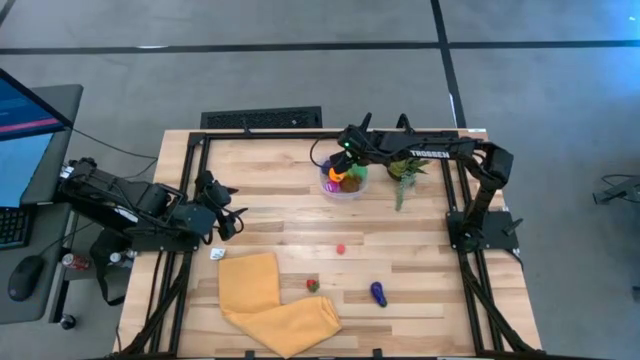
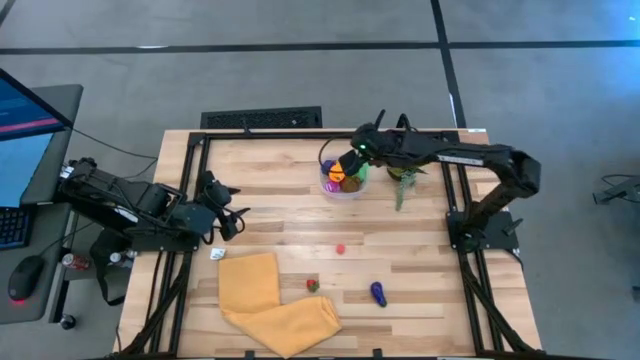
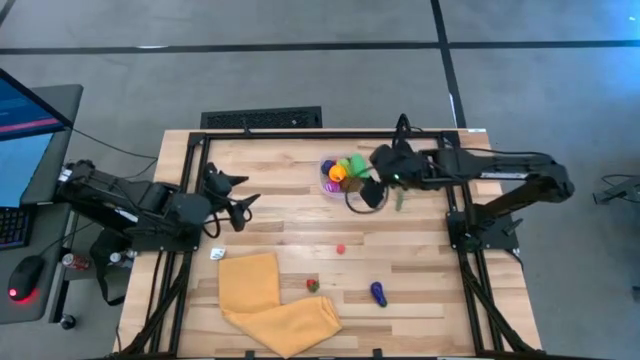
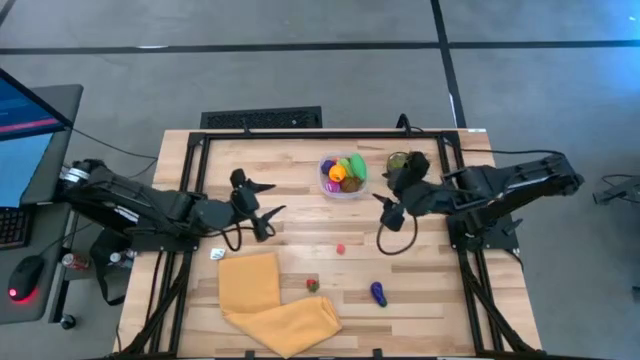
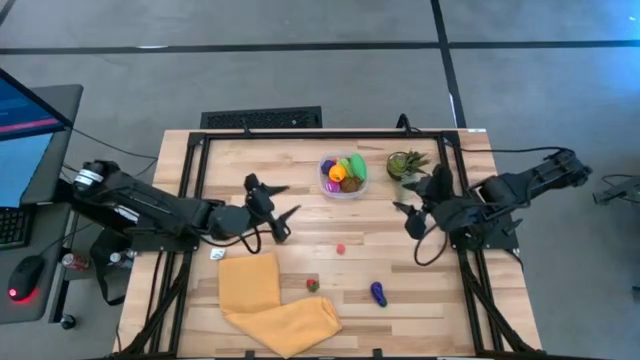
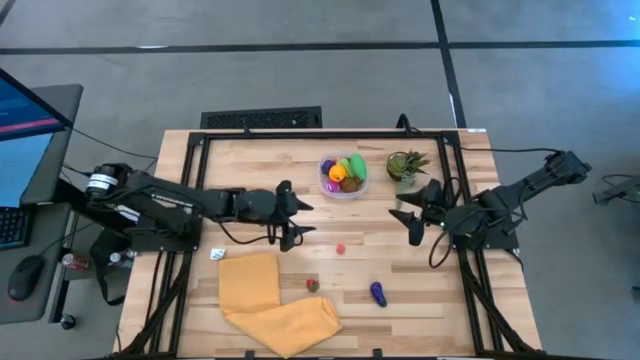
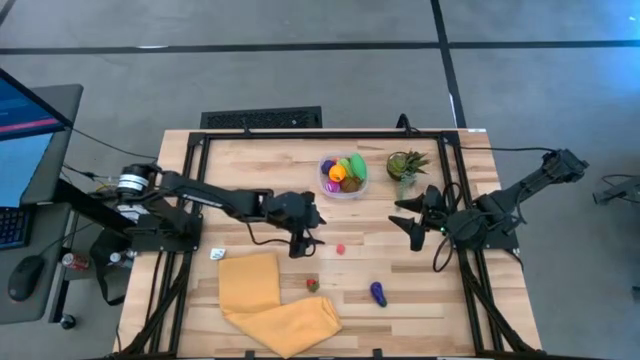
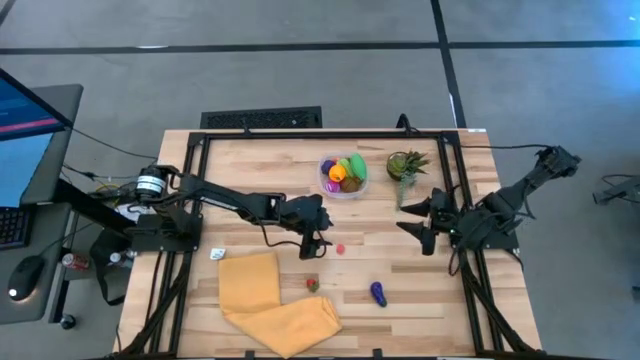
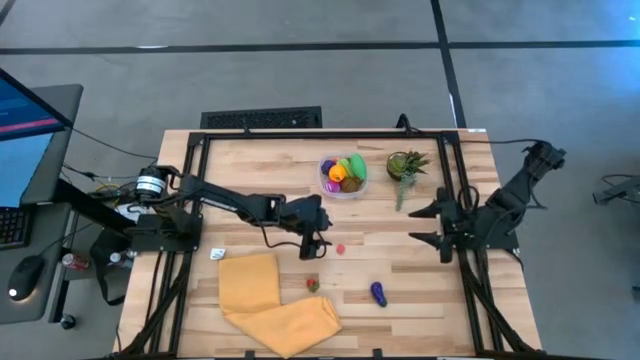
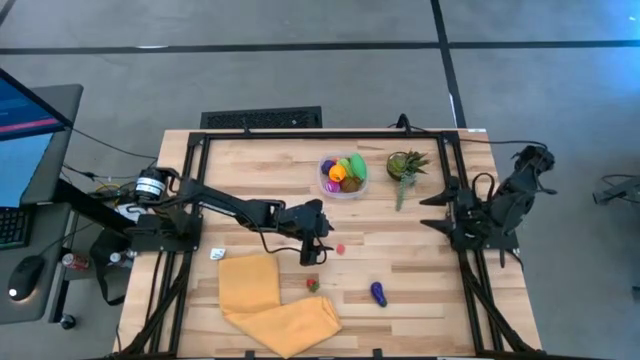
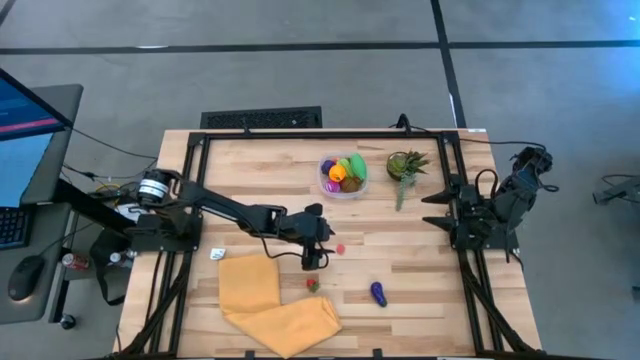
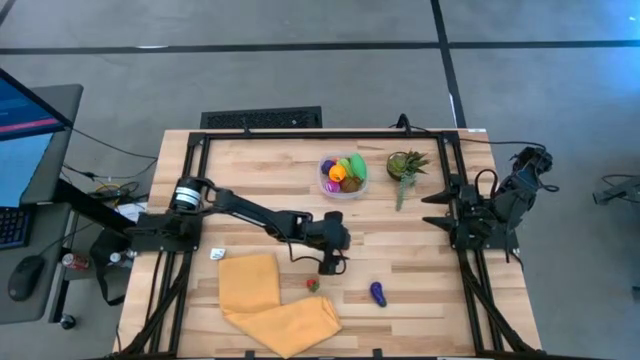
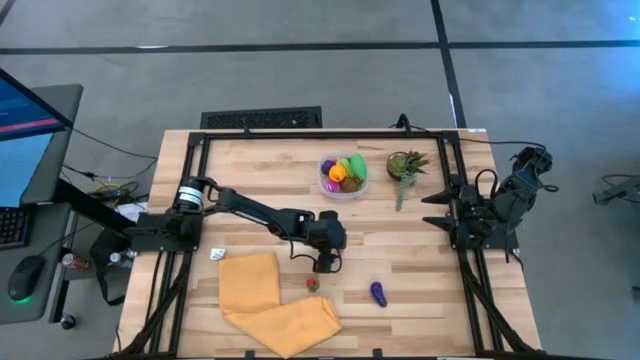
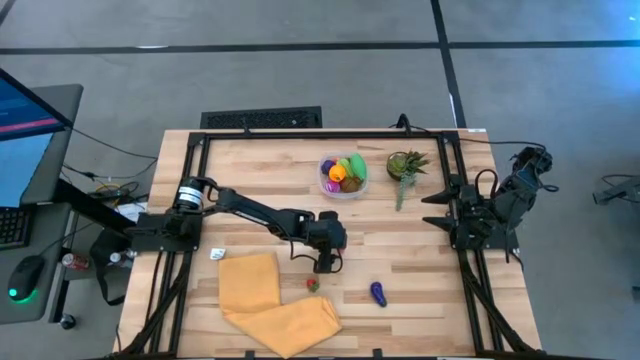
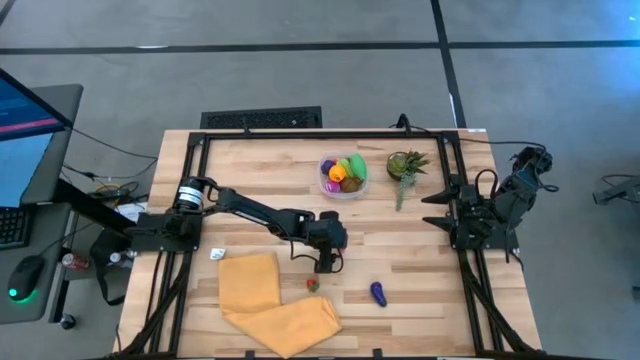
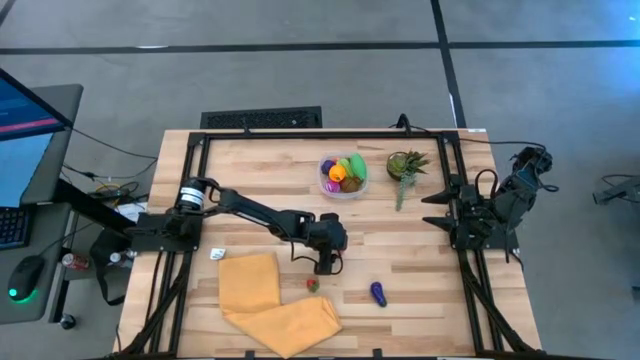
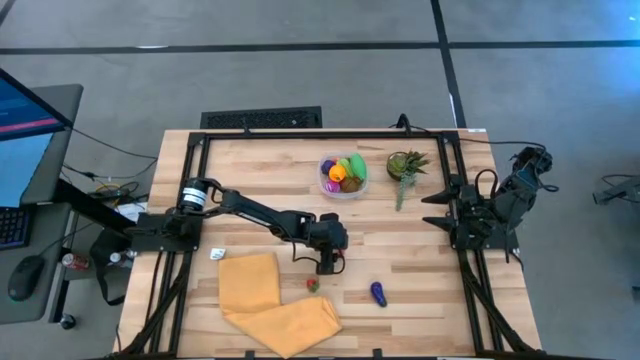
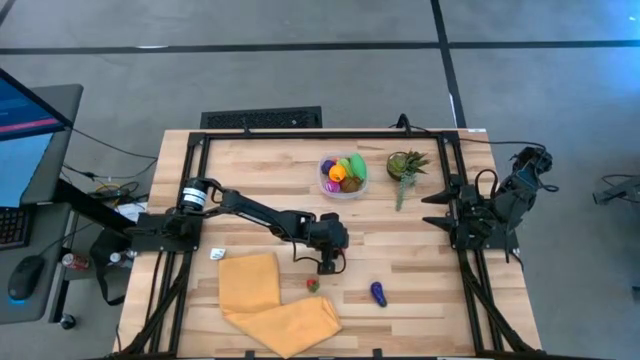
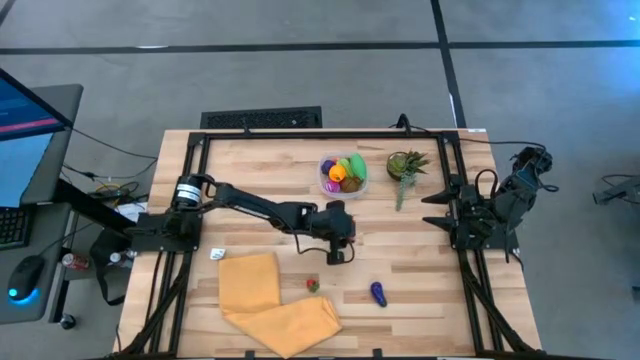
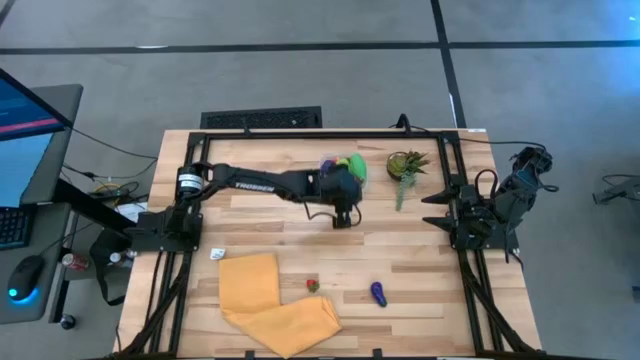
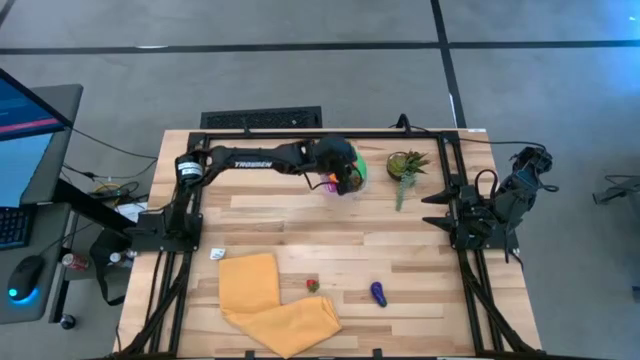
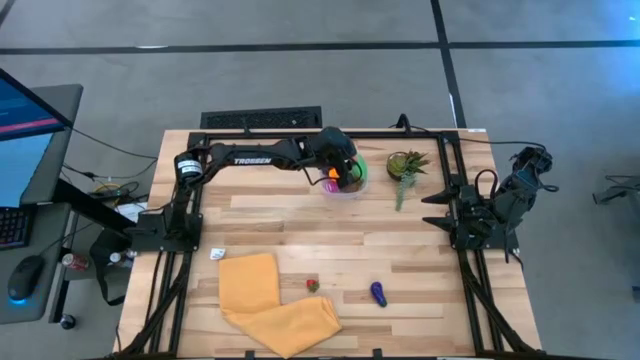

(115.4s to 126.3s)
Task: Pick and placing Produce into tupperware
Put the peach in the transparent bin

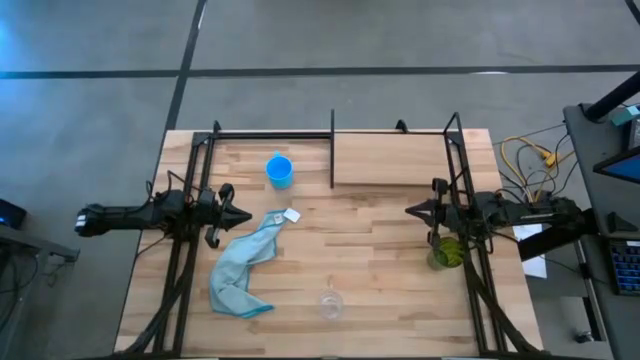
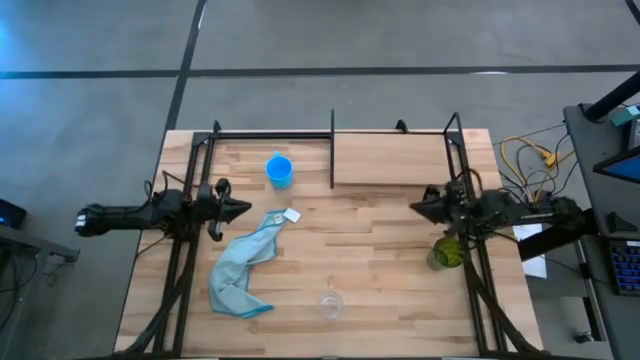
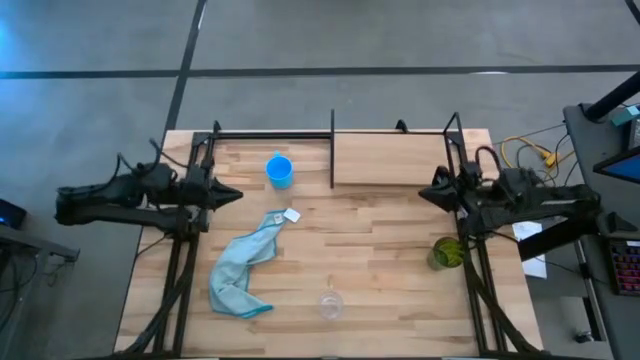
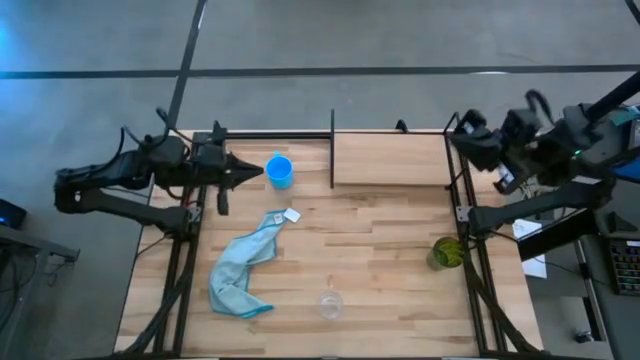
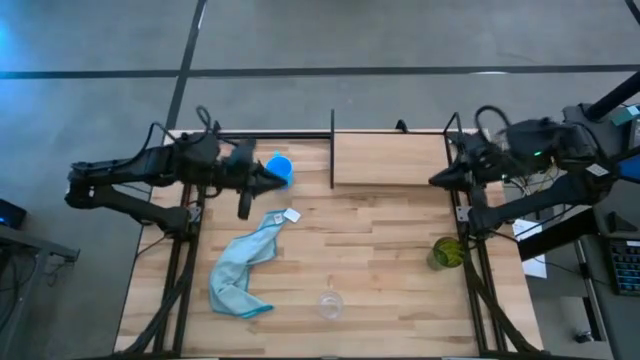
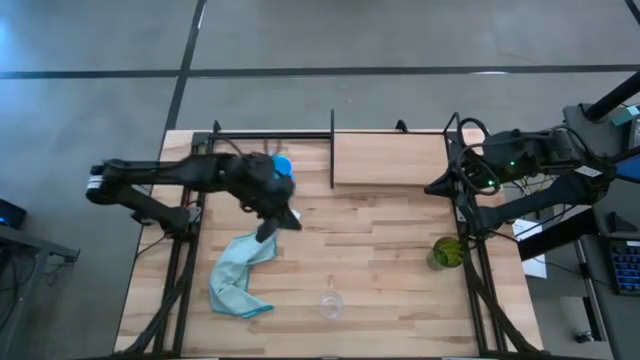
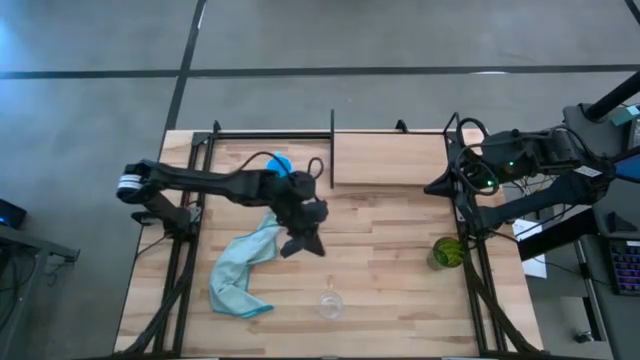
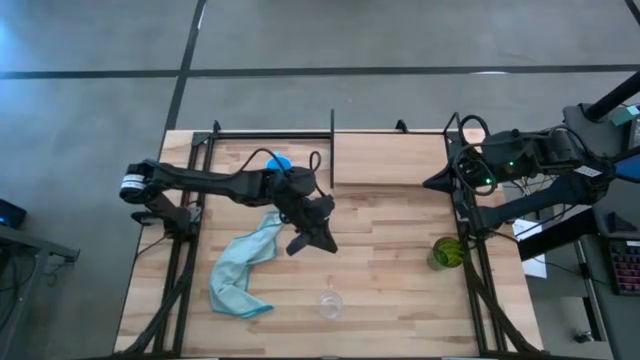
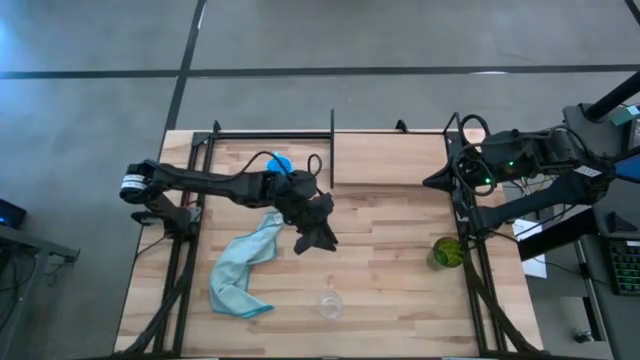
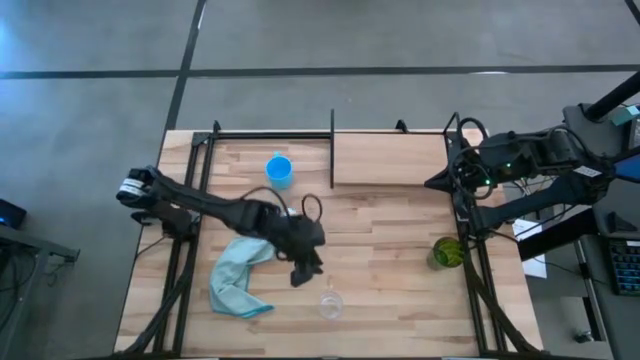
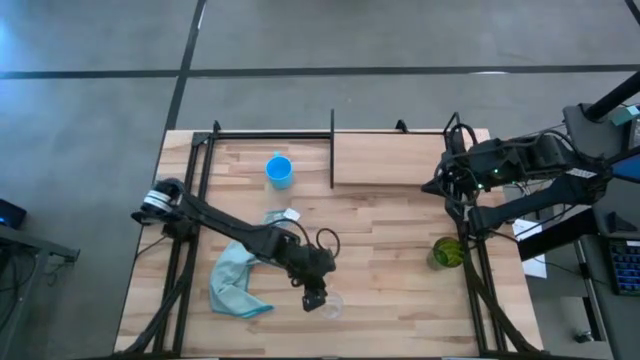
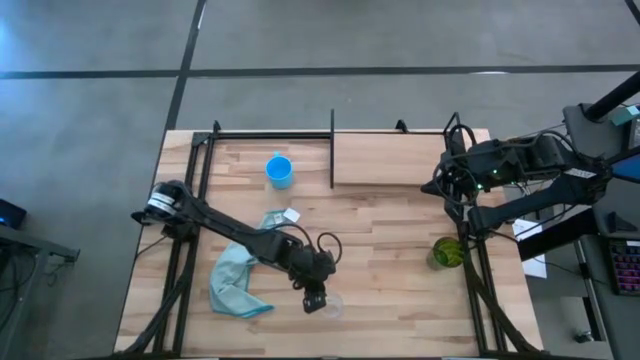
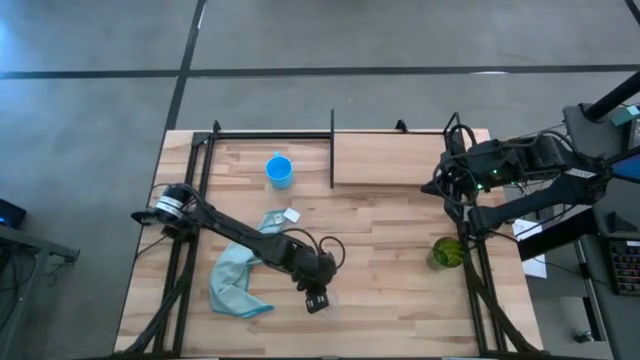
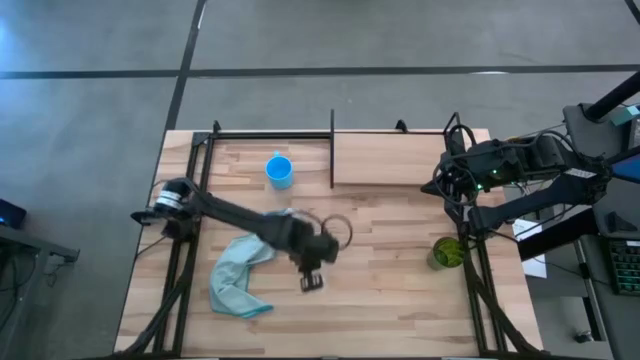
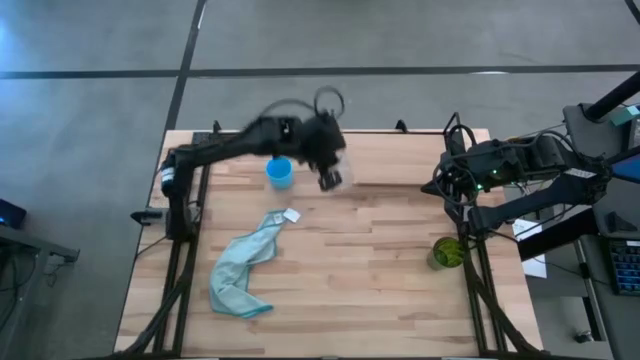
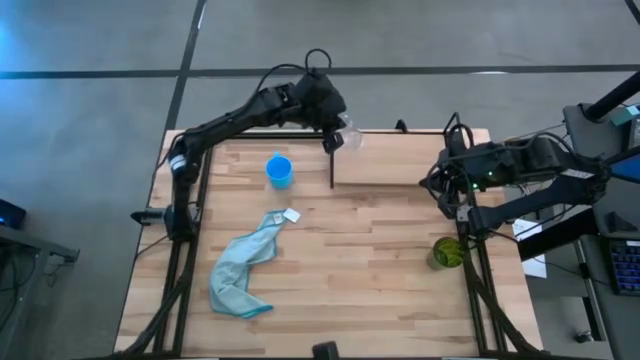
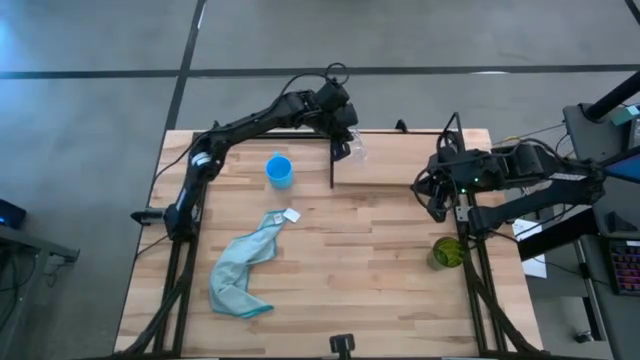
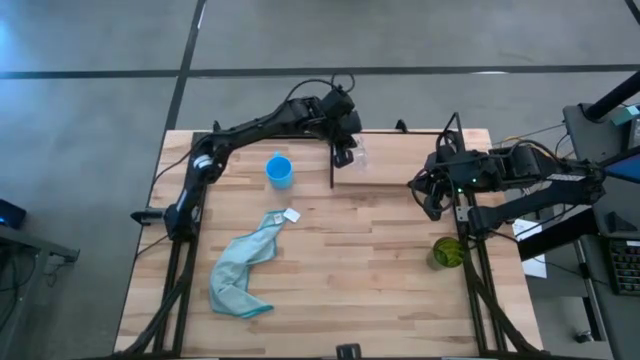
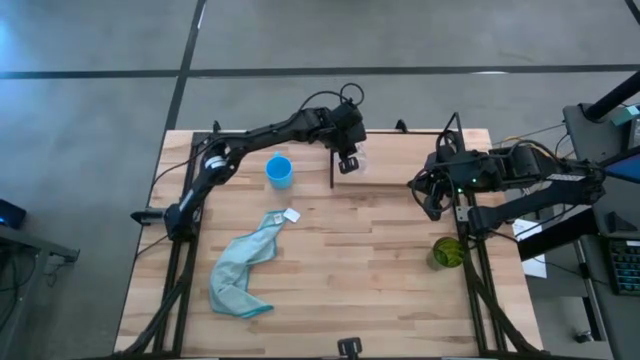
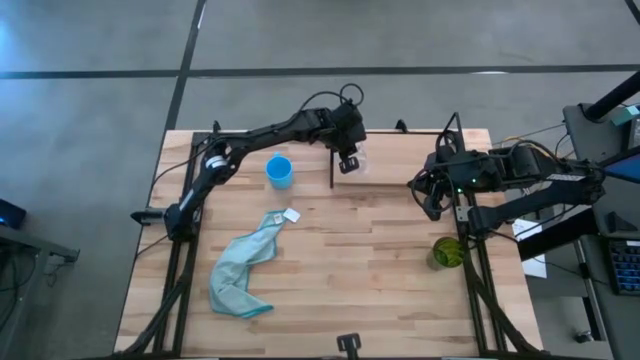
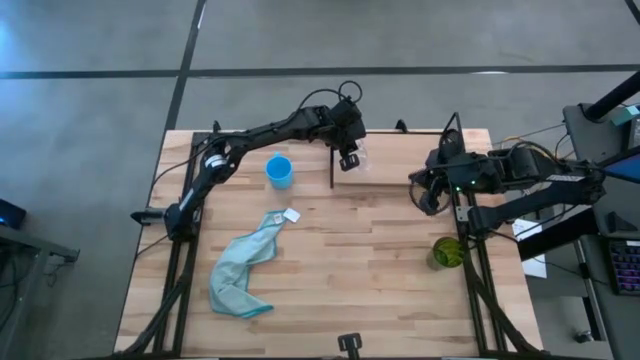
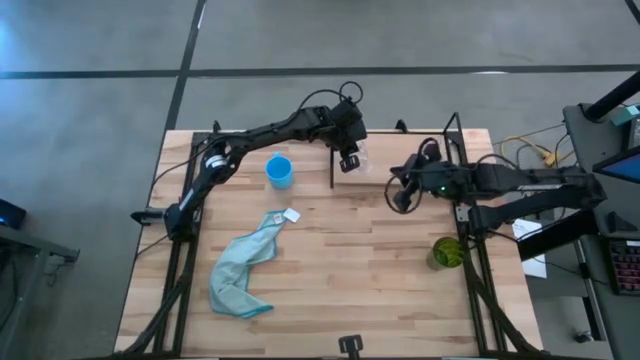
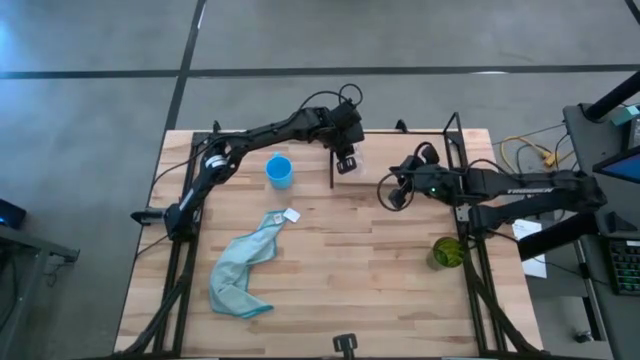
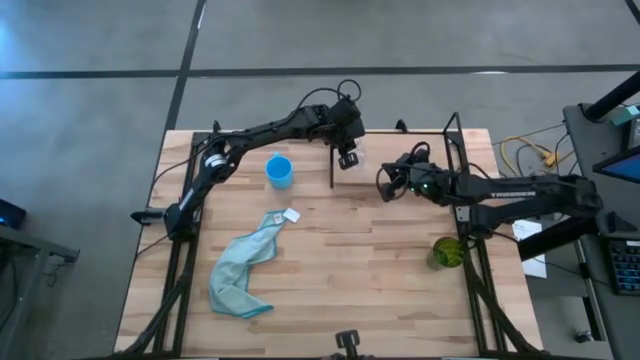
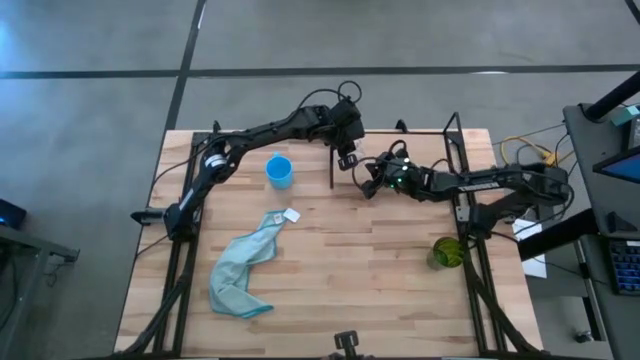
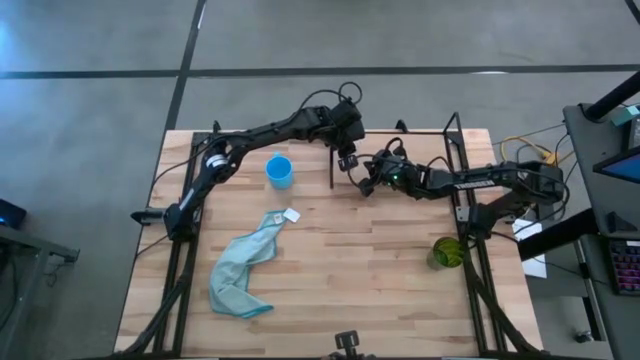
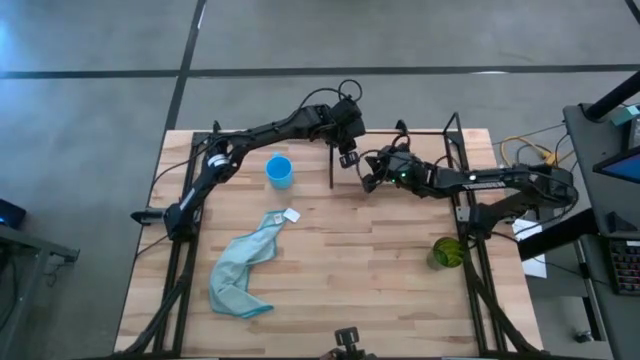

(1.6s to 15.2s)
Task: Stack small to large cups/mugs on shelf
Put the transparent mug on the shelf
